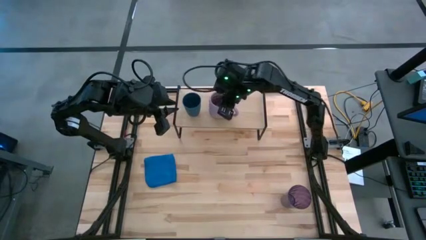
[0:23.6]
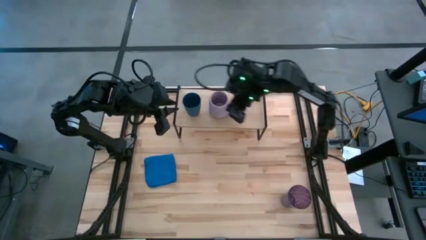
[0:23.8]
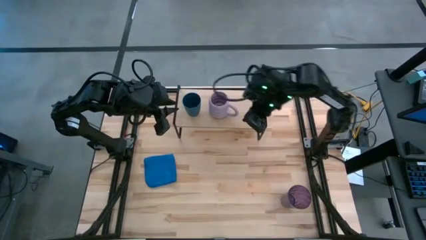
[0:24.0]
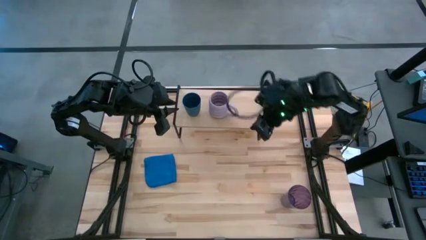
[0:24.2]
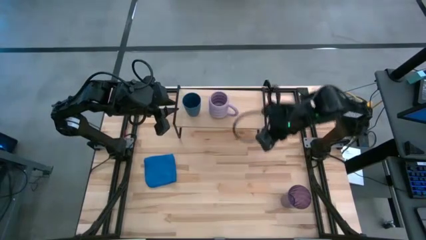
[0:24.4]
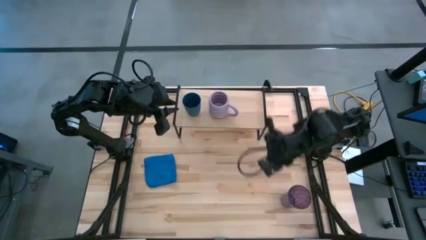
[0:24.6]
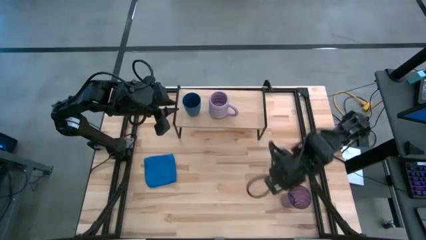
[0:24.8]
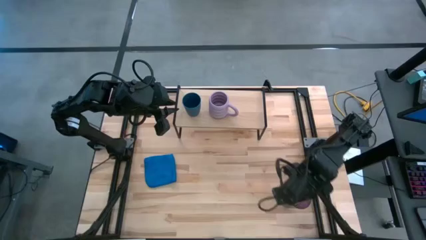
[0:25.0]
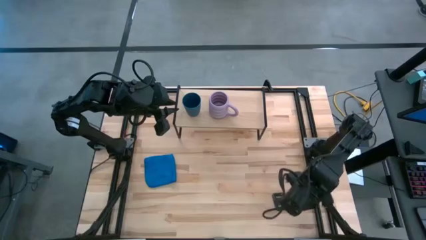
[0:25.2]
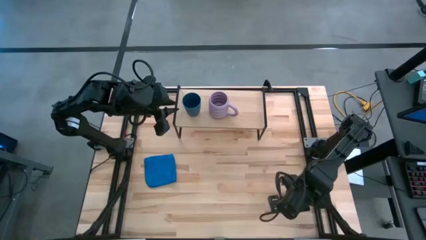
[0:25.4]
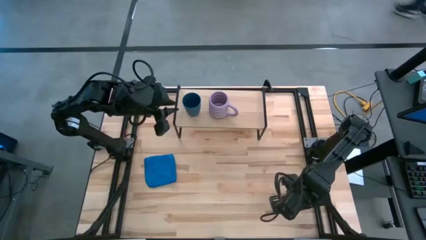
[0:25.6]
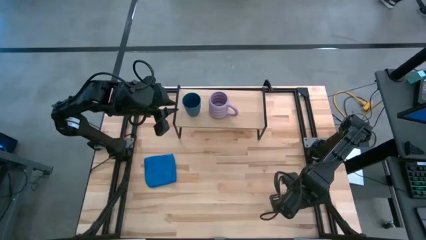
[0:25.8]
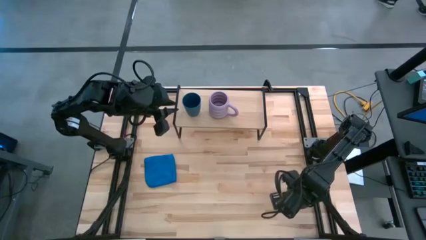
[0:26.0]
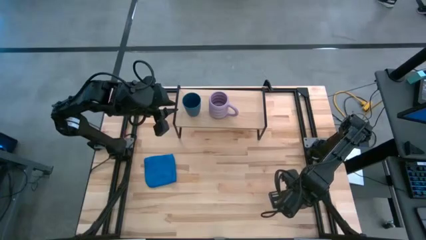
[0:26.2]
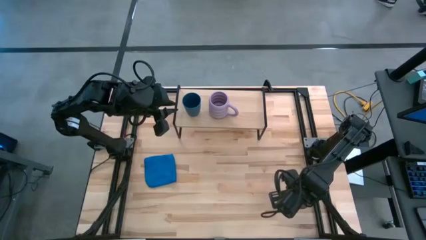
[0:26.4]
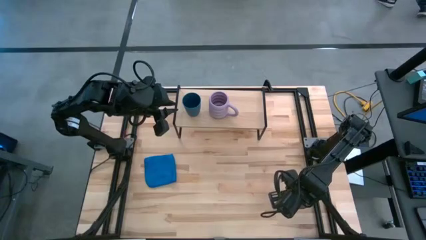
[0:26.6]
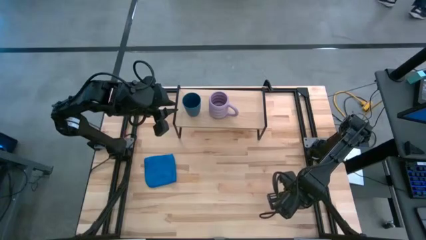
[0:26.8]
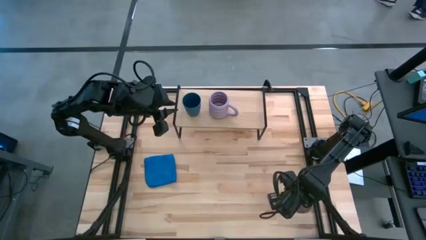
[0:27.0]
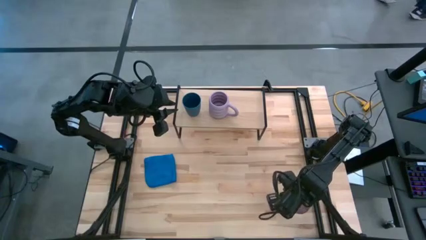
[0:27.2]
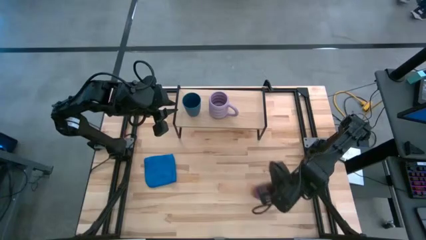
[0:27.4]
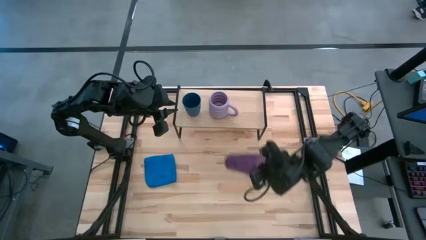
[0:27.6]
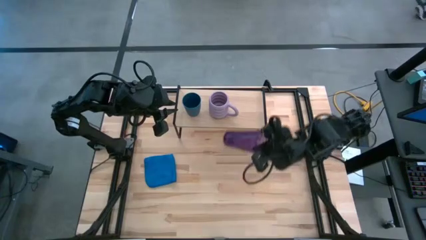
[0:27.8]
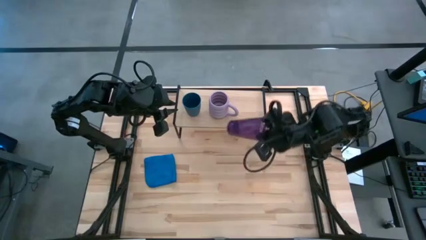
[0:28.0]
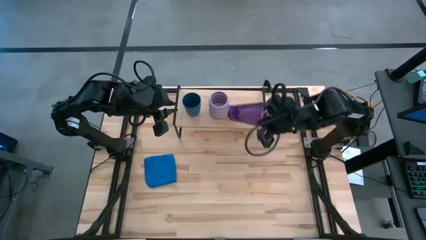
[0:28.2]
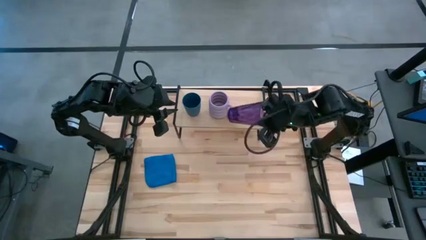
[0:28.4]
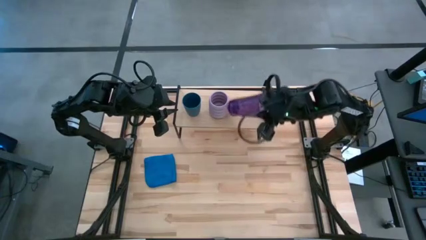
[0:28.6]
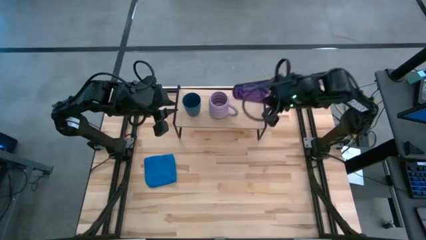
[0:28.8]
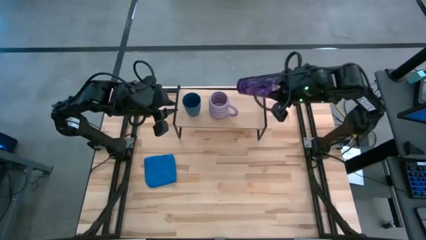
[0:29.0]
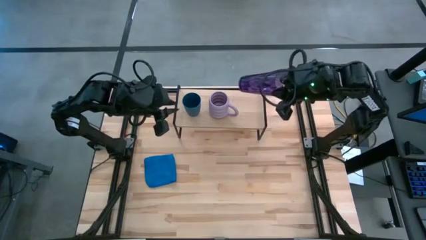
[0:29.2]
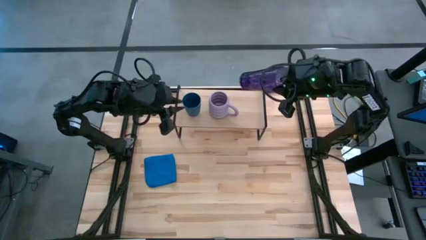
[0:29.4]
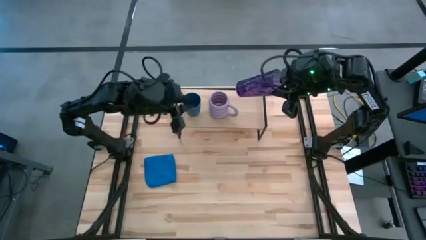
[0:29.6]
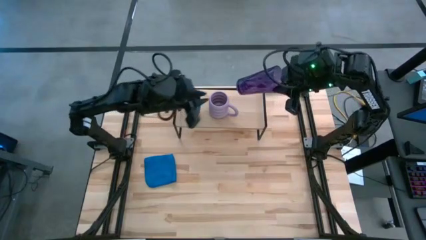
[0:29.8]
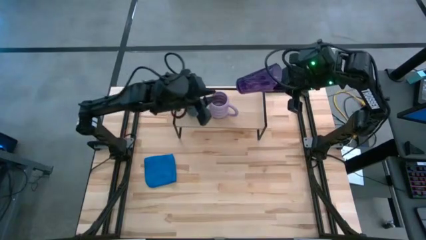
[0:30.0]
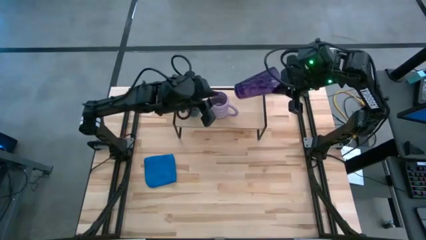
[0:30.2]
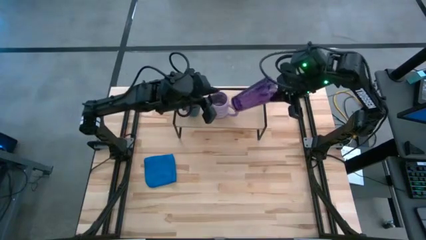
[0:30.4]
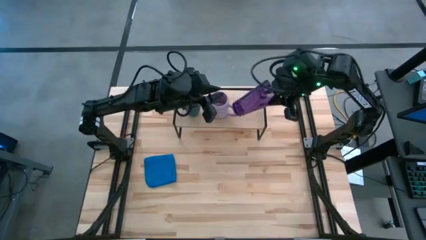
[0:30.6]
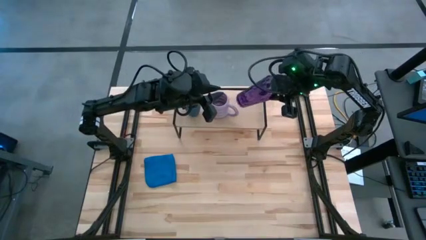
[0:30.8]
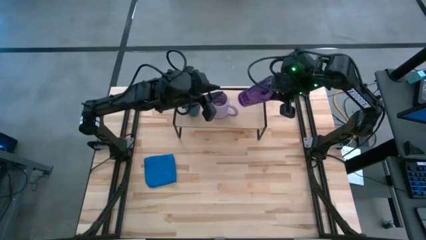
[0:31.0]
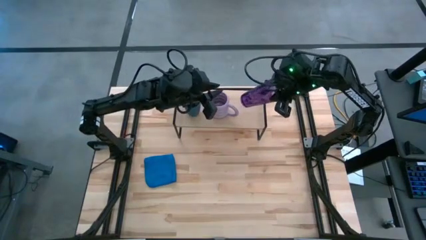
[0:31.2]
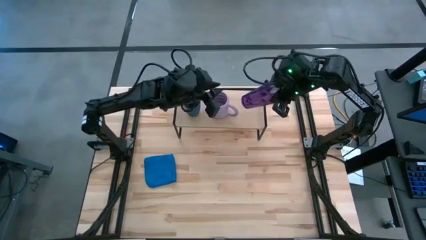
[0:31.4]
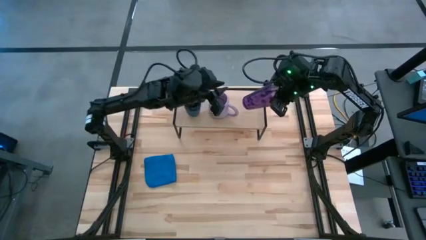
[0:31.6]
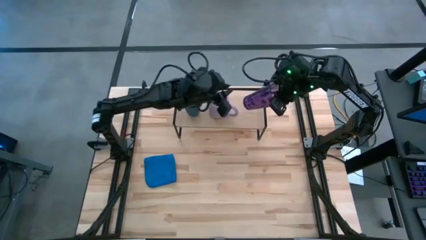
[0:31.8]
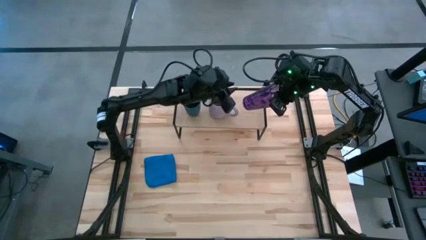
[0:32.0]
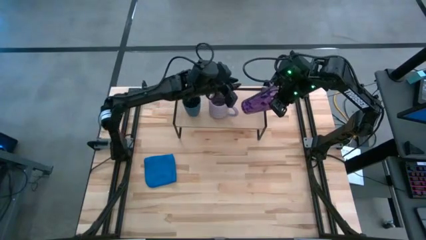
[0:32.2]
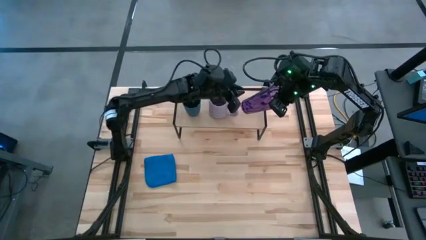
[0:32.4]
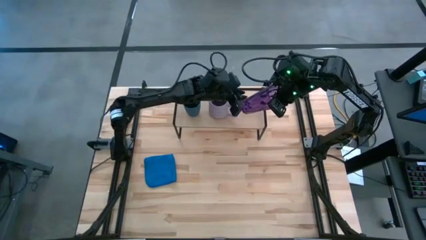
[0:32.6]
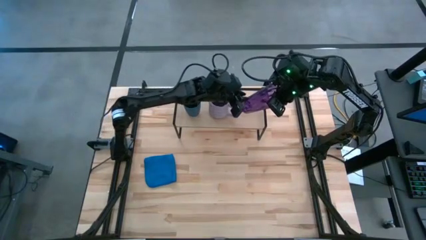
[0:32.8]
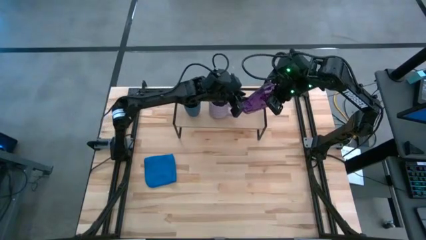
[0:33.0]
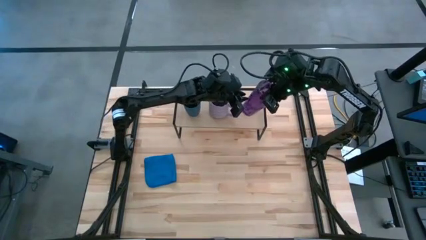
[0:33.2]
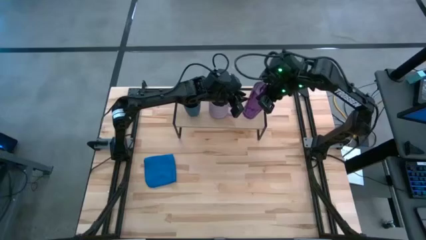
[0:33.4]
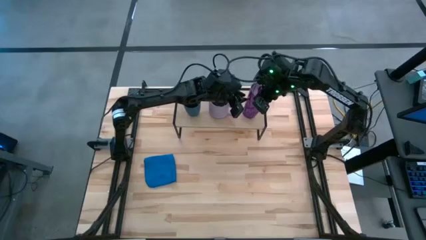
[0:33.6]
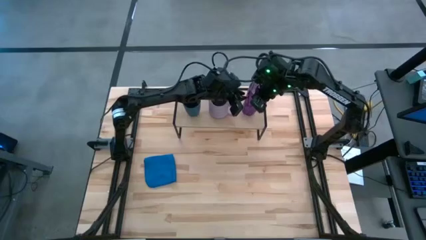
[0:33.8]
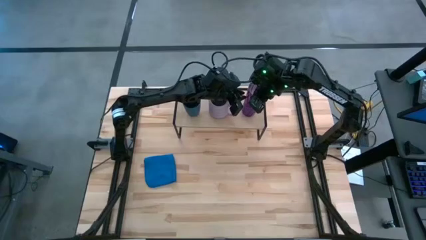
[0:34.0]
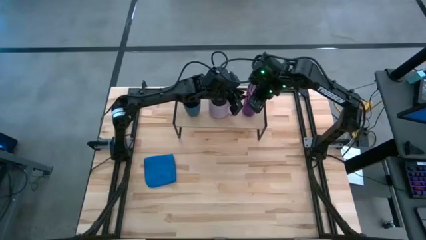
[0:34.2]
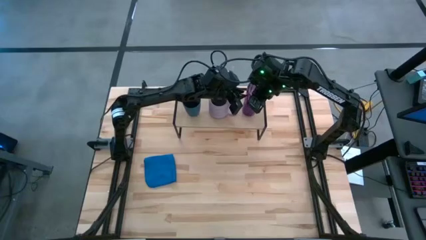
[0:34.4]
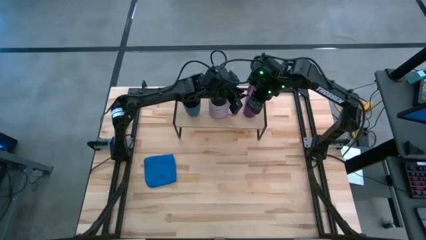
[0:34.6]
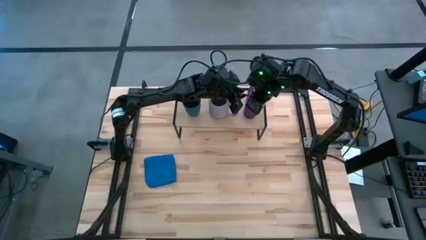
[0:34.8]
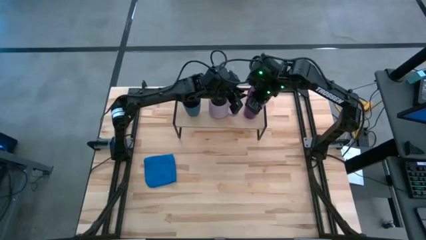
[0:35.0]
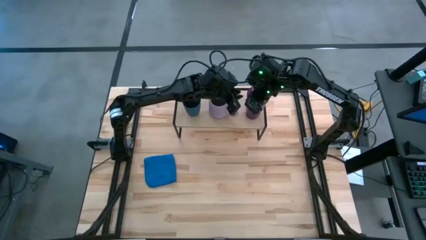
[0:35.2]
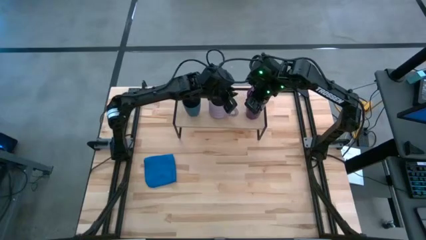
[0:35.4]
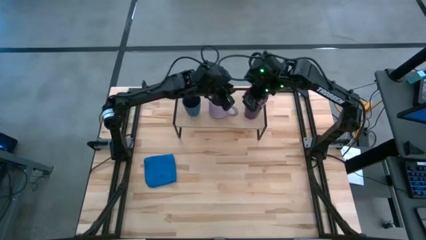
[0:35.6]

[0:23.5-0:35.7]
Task: Stack small to large cups/mugs on shelf
Put the purple glass on the shelf

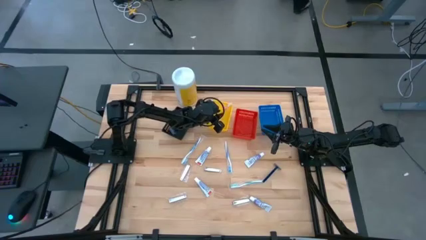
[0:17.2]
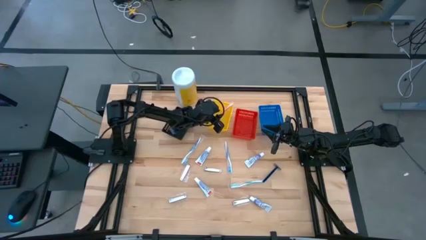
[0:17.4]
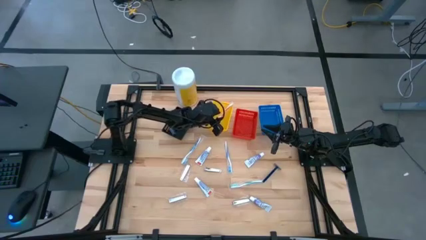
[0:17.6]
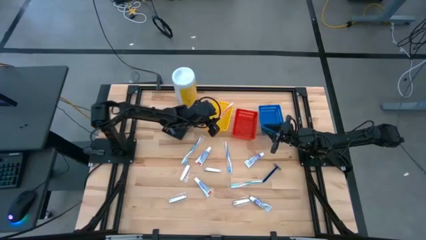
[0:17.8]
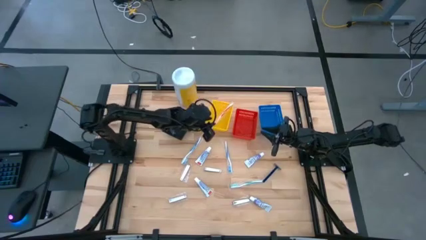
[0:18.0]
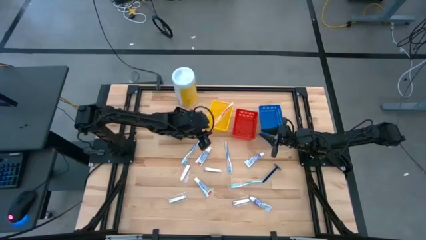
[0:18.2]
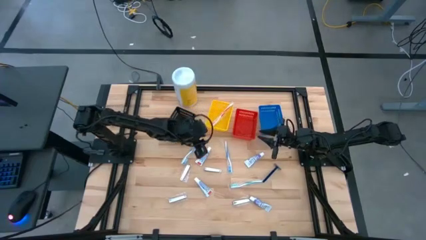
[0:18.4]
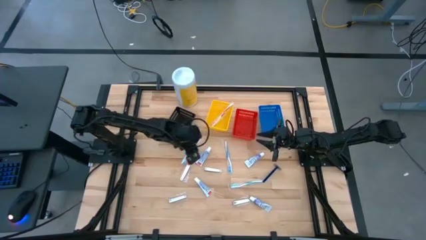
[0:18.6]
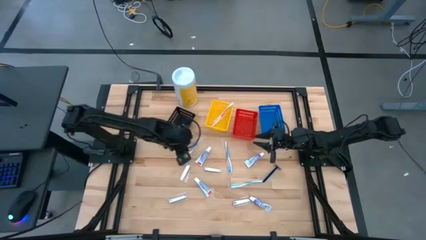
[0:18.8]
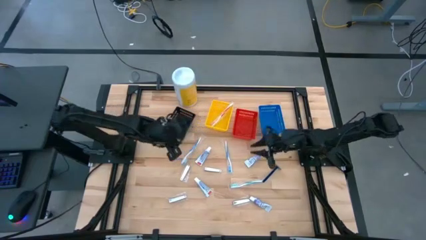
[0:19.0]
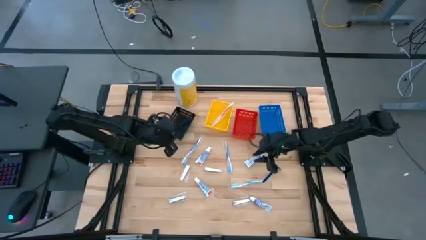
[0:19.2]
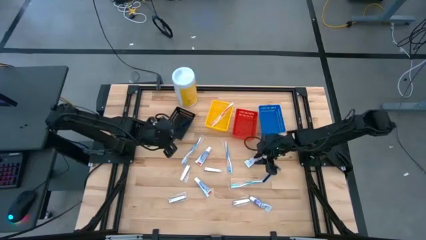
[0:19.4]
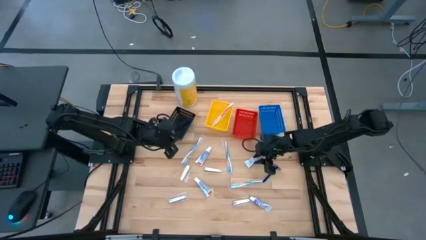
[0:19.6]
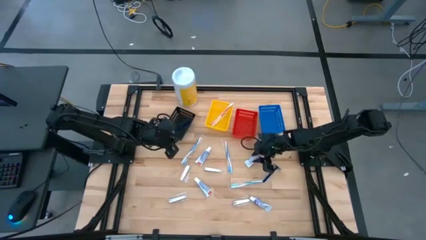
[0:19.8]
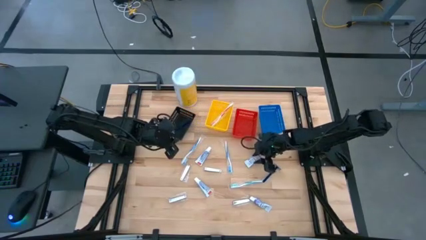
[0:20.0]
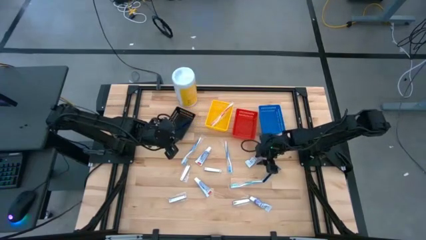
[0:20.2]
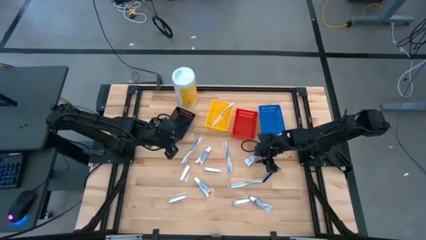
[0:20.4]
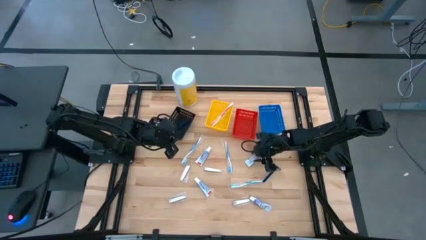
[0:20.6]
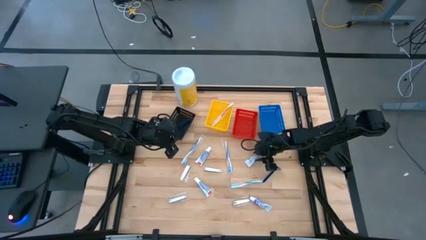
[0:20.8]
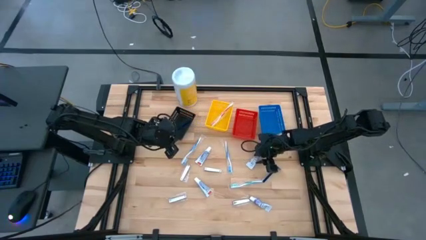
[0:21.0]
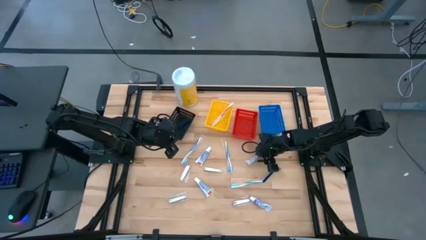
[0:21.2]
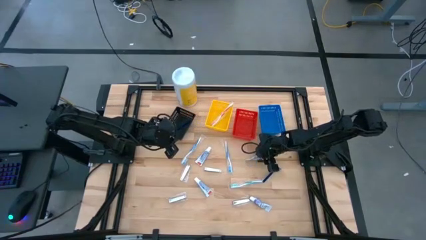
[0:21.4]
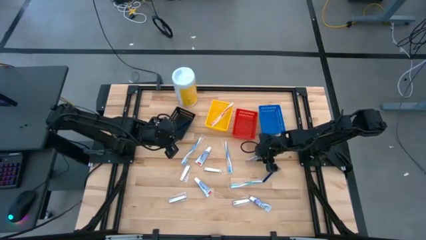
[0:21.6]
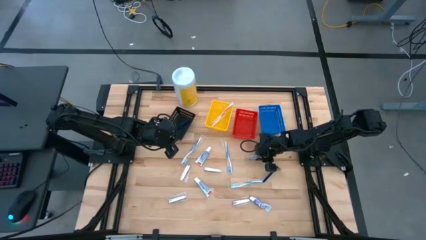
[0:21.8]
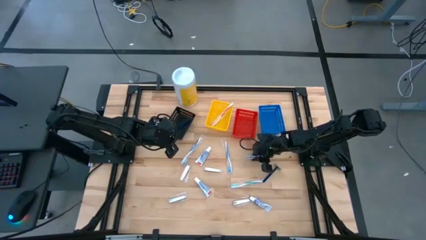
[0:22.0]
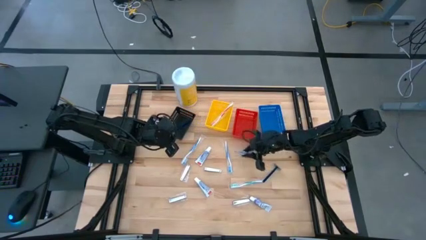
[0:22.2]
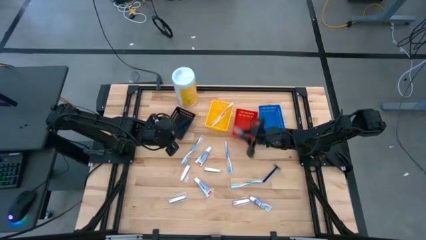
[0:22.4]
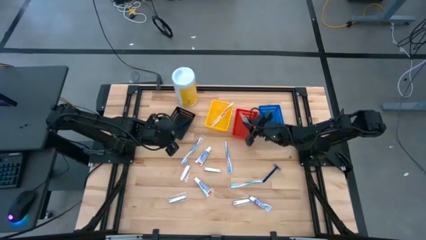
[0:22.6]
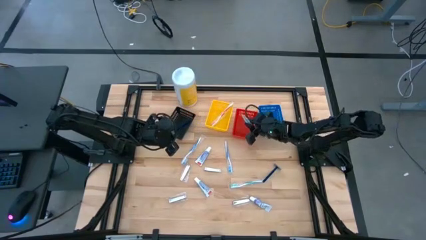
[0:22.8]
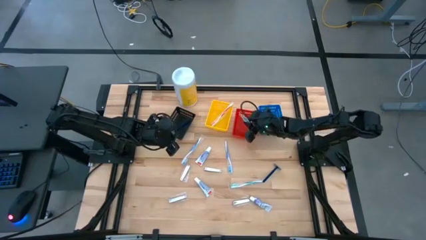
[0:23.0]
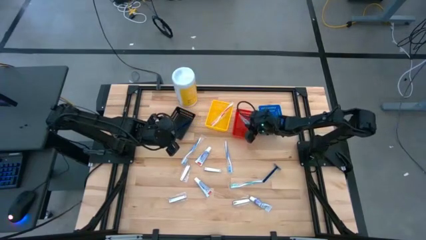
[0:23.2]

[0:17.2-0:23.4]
Task: Pick & Place Travel size toiletries
Put the white toothpaste into the red bin
